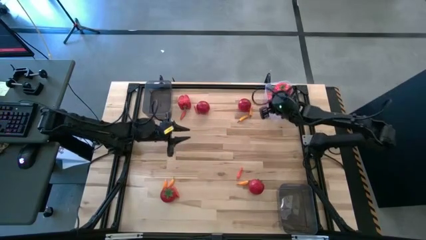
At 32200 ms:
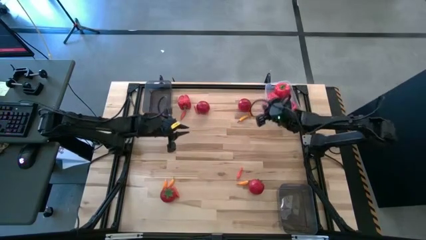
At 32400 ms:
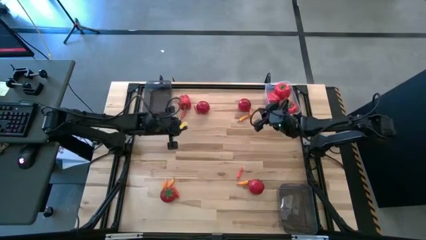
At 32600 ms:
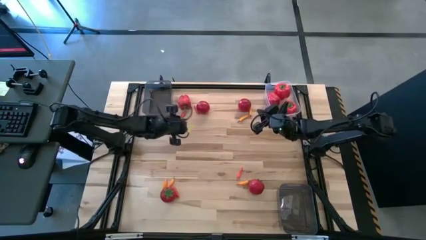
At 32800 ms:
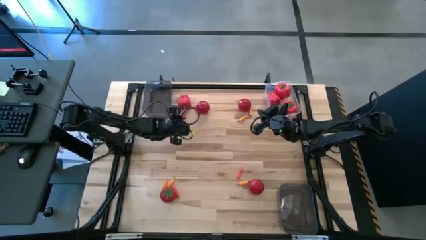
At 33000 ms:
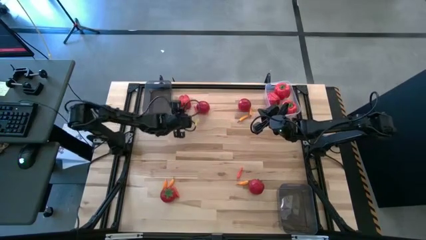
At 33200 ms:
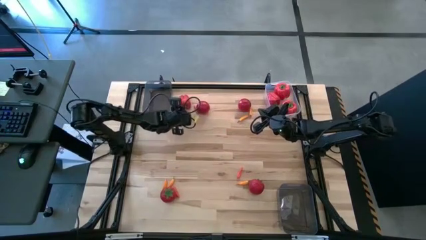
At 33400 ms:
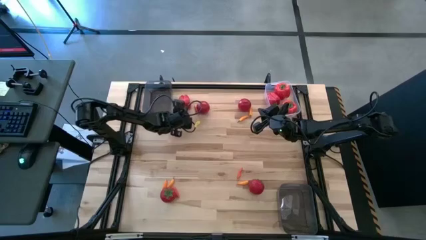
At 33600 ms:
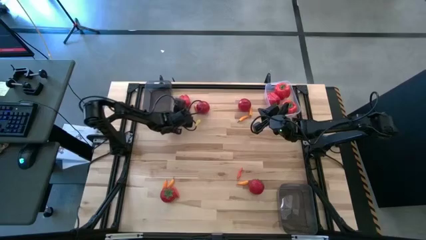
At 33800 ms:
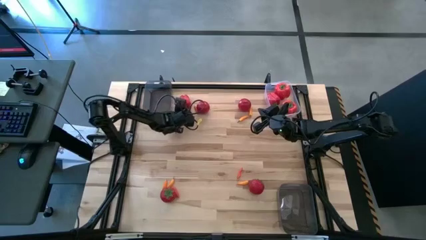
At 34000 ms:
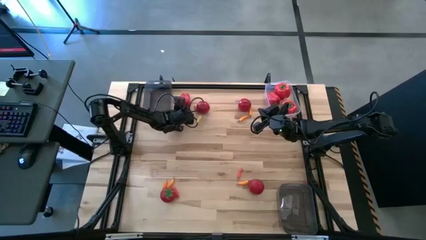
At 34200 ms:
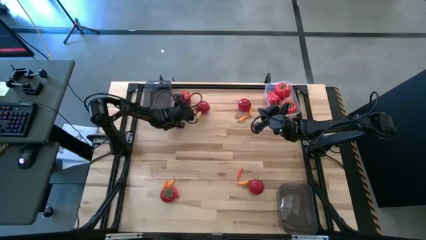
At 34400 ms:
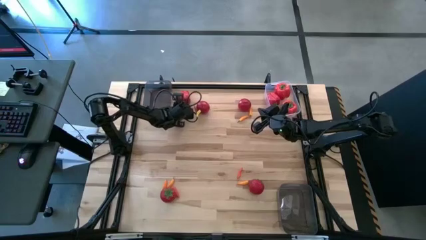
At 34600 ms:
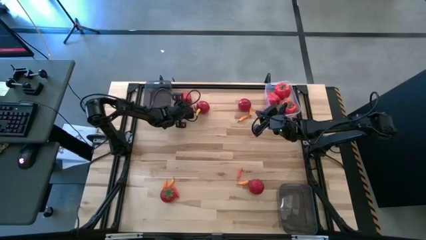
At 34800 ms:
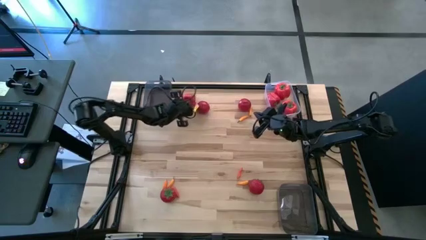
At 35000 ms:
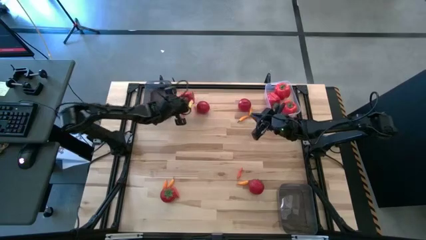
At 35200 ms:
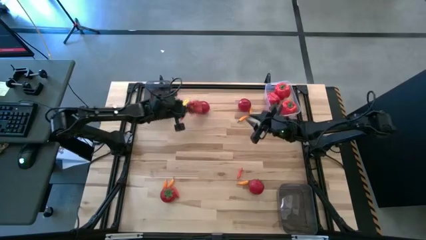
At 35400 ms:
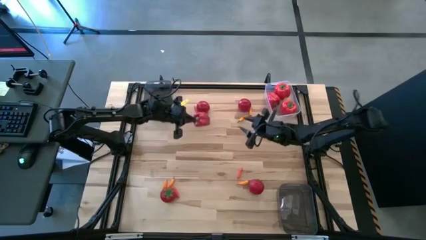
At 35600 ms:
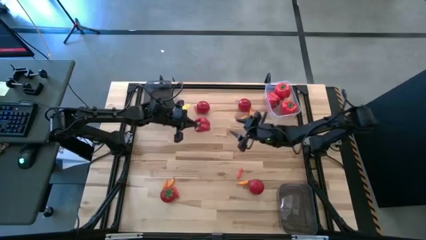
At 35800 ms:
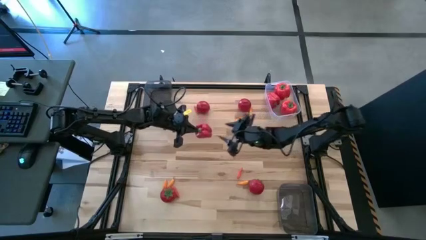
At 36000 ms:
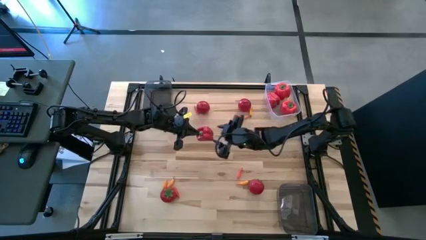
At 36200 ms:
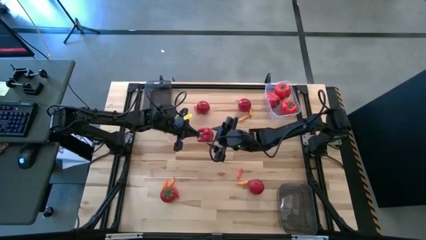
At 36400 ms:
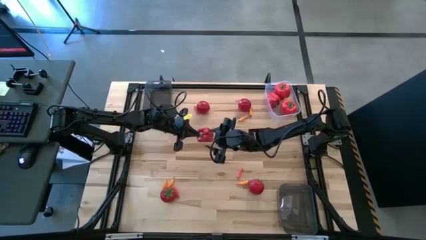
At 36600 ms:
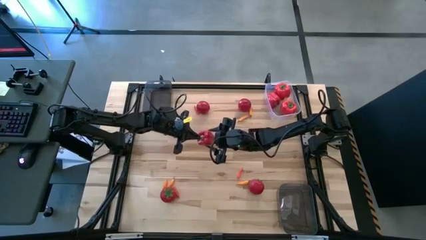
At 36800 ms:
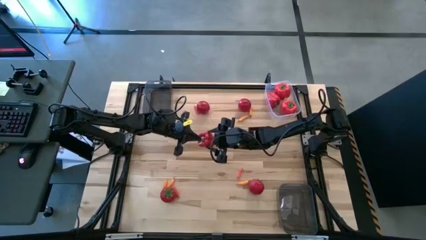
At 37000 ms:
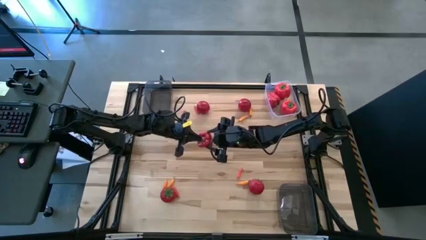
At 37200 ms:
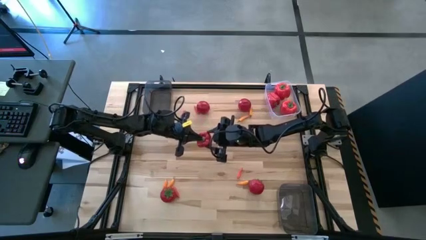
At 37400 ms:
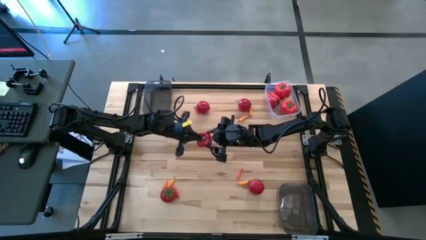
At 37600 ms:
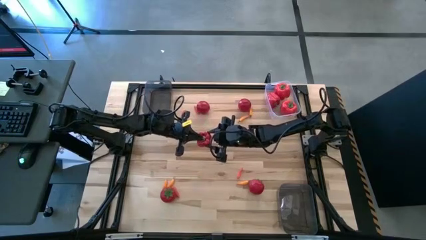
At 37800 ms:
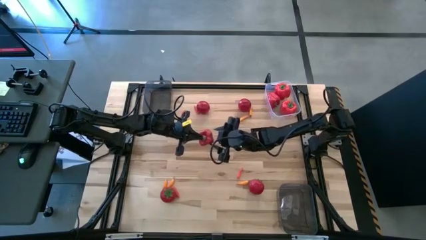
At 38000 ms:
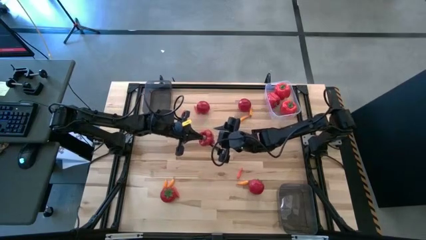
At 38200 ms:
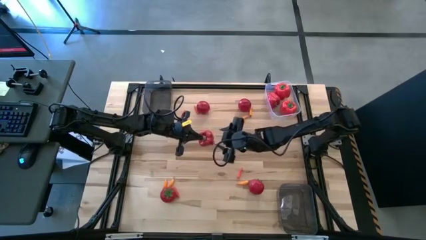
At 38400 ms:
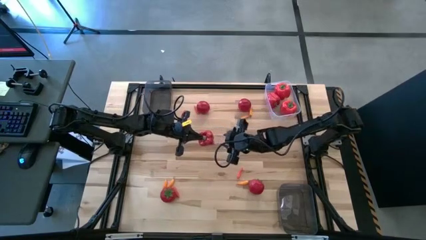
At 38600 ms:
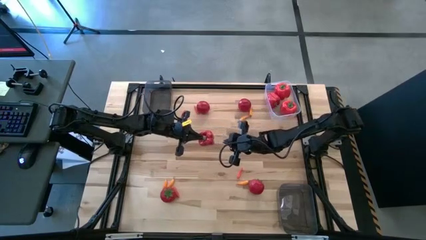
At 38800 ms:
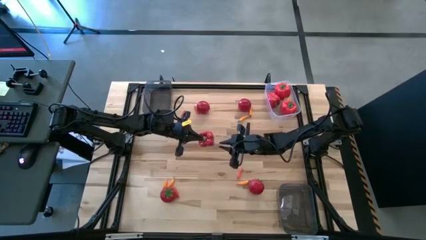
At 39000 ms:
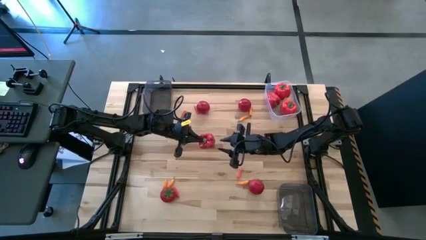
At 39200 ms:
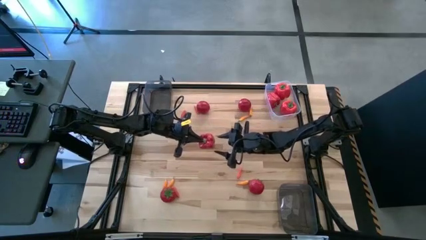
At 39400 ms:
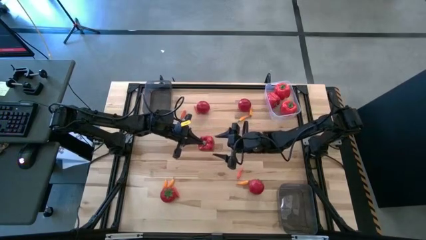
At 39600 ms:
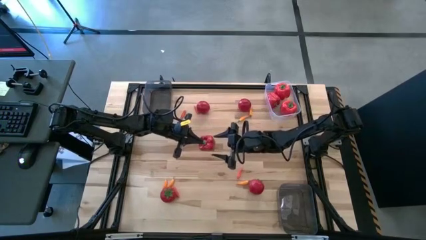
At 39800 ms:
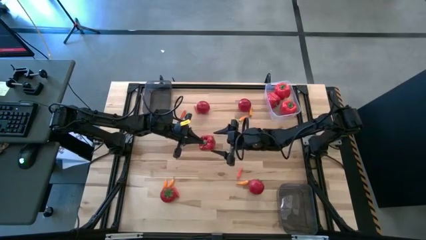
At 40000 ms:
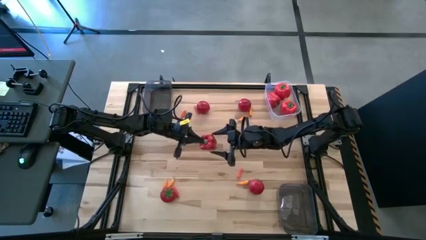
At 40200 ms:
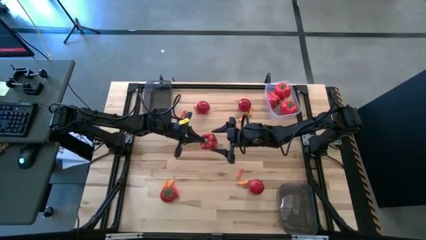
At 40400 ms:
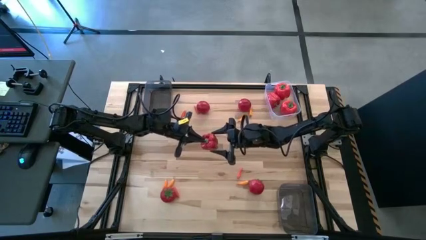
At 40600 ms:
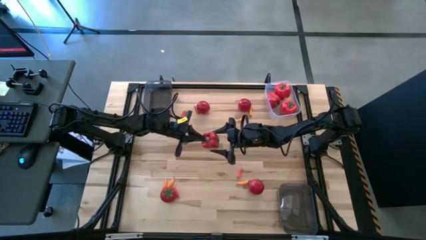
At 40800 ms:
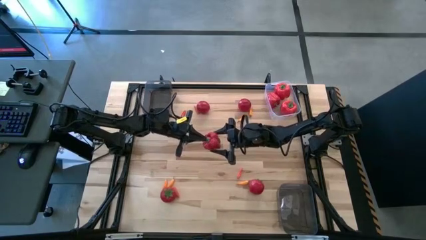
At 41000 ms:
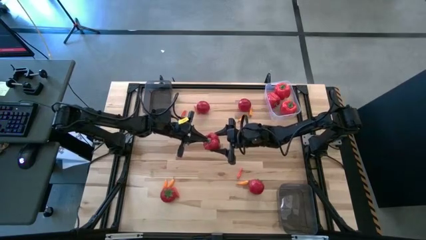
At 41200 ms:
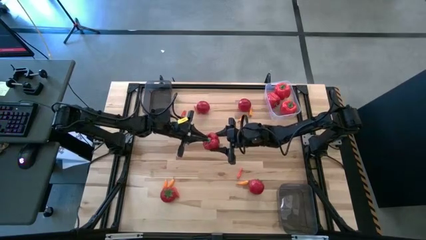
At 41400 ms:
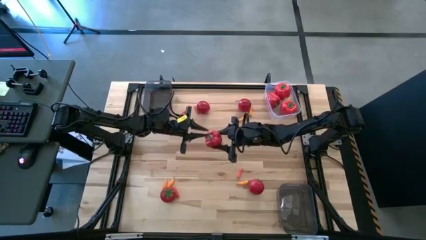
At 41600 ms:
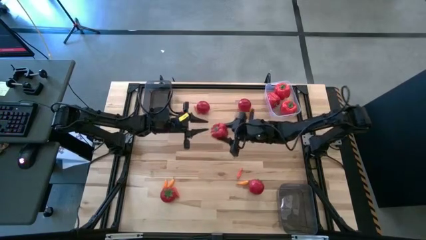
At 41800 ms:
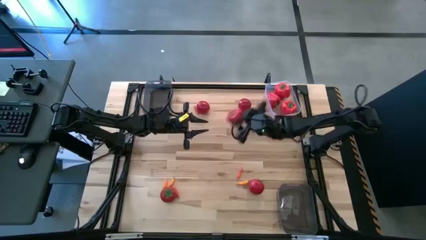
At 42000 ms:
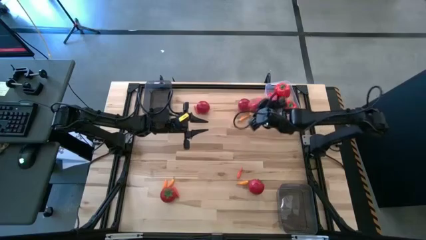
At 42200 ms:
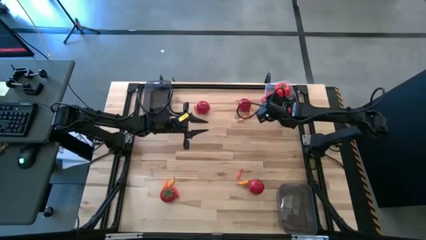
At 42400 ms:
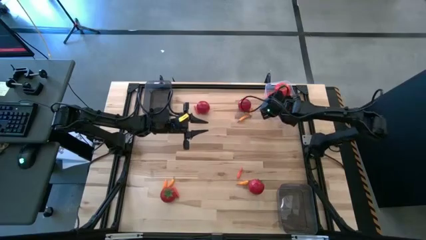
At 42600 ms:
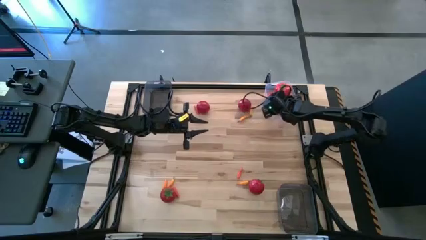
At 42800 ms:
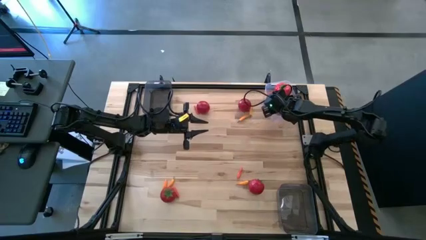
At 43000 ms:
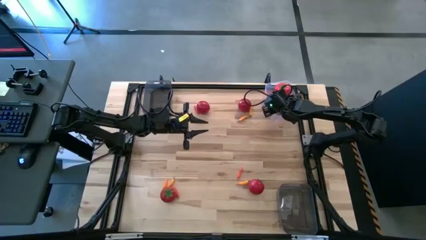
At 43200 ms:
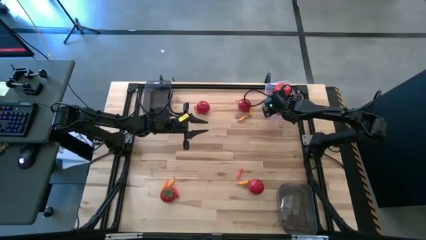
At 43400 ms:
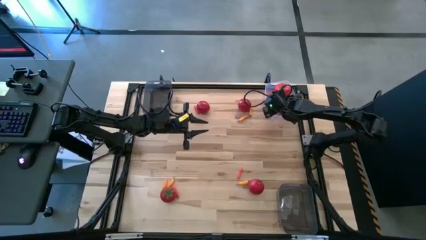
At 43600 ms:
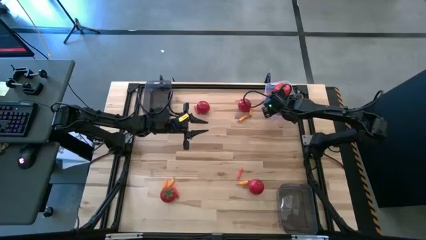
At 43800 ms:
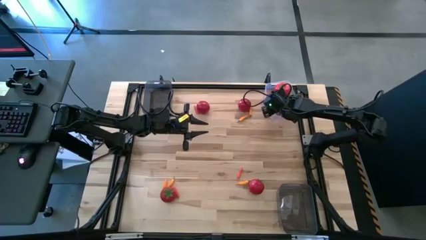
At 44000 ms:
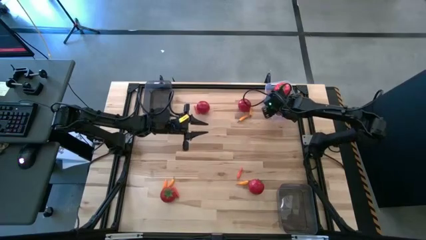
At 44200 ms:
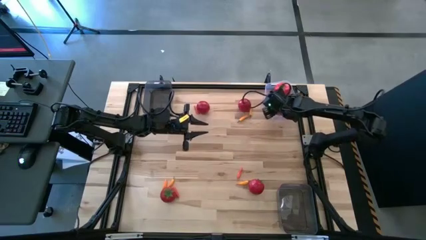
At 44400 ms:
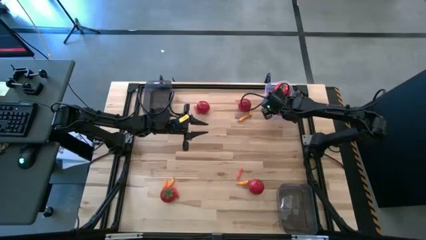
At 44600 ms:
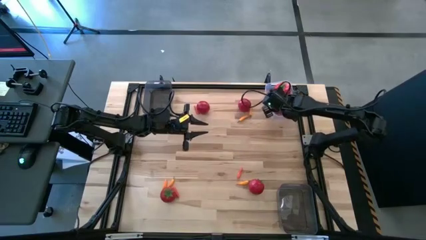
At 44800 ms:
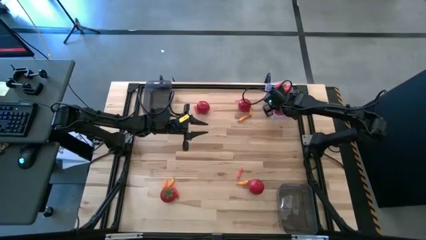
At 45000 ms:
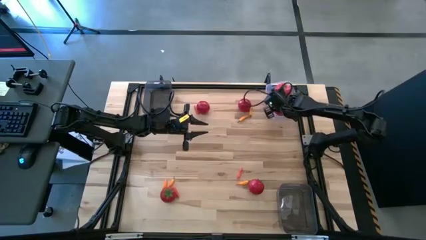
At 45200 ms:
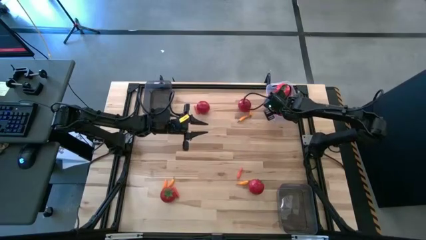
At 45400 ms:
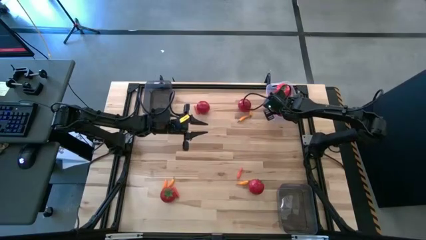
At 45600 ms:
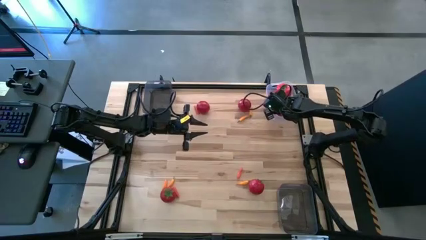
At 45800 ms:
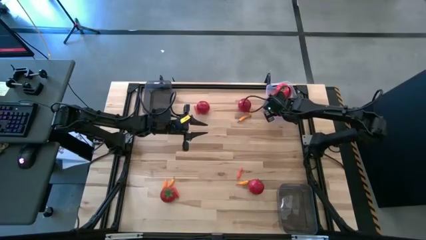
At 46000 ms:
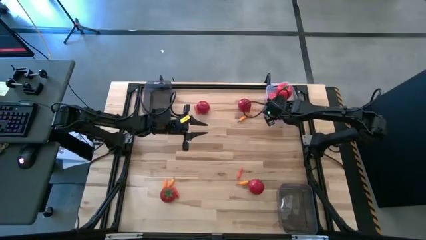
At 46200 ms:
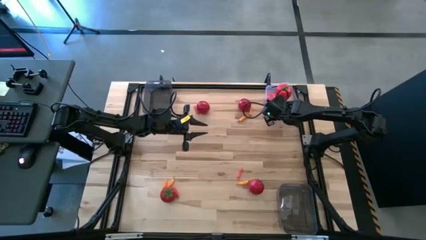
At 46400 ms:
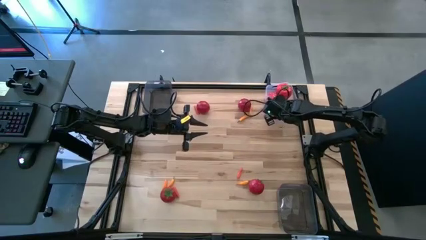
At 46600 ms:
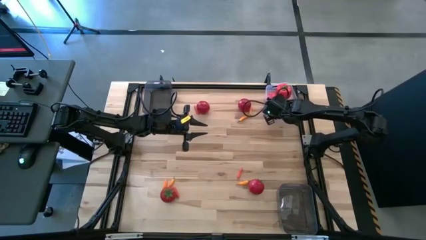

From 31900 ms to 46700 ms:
Task: Sort produce into baskets
Put the red bell pepper into the transparent bin

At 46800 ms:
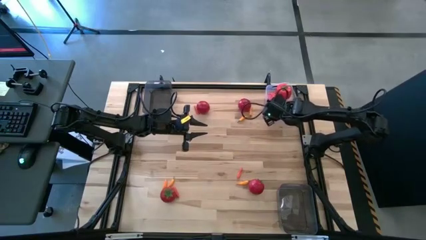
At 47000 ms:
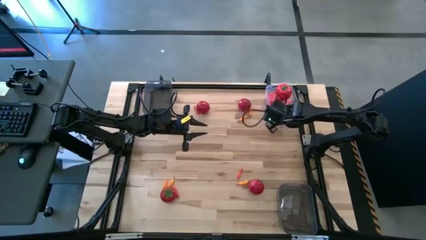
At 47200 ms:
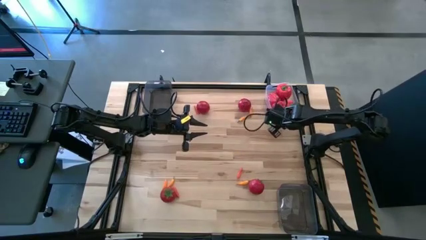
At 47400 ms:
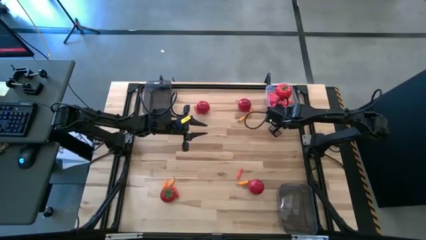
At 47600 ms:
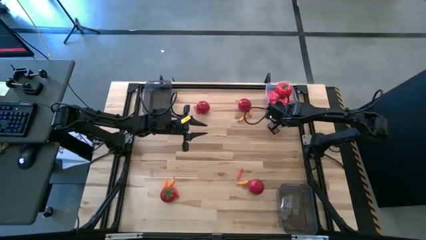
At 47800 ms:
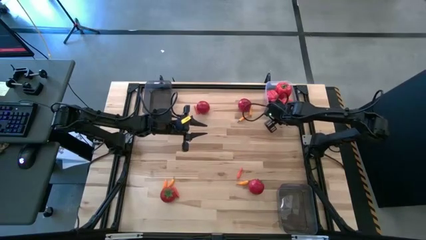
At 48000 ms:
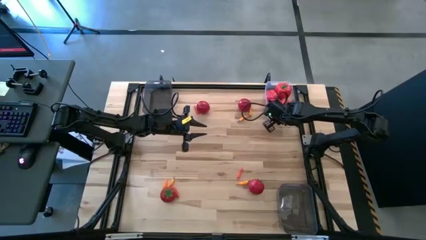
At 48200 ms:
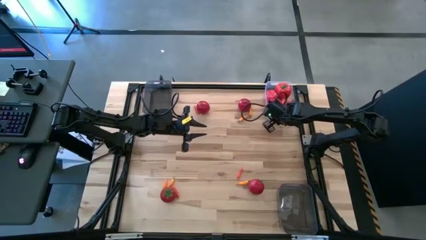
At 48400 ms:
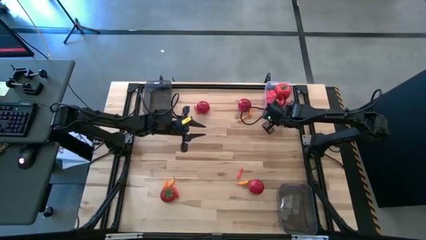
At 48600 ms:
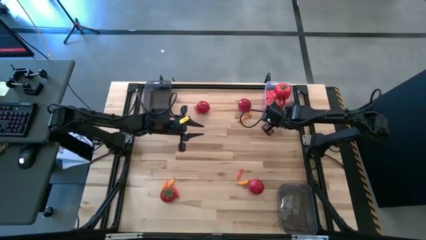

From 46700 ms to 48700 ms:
Adjust the transparent bin
